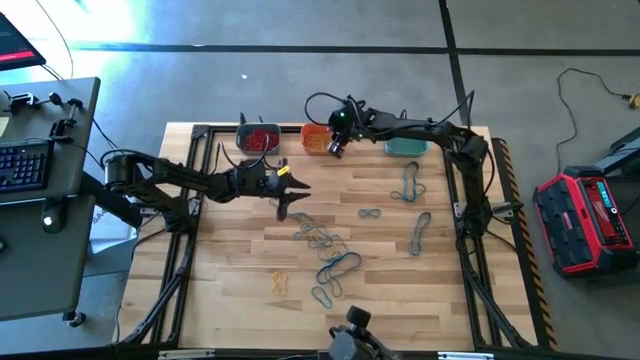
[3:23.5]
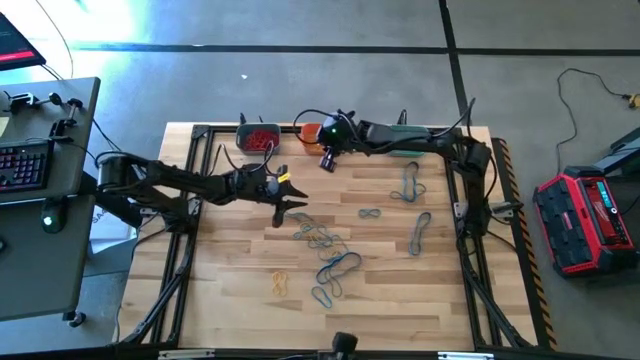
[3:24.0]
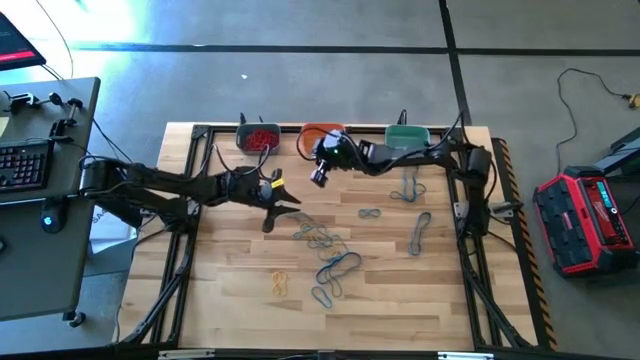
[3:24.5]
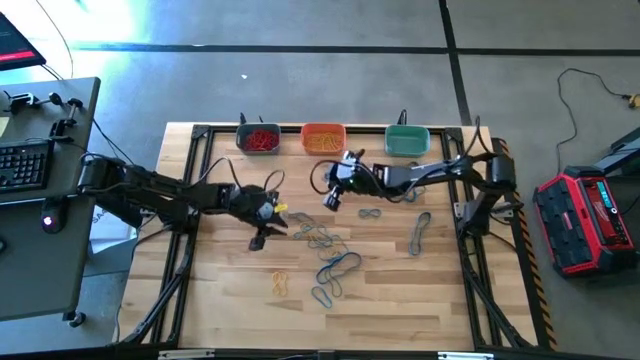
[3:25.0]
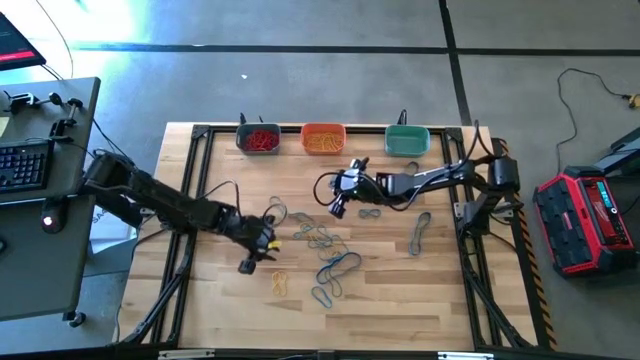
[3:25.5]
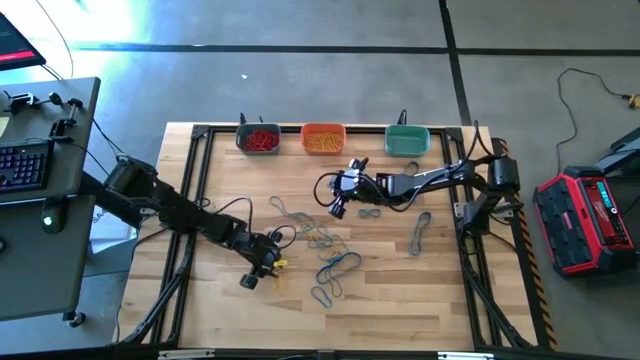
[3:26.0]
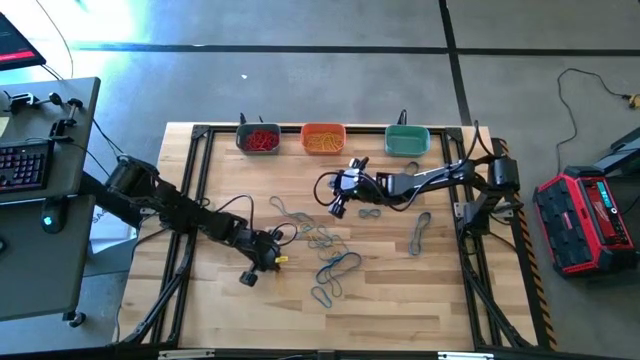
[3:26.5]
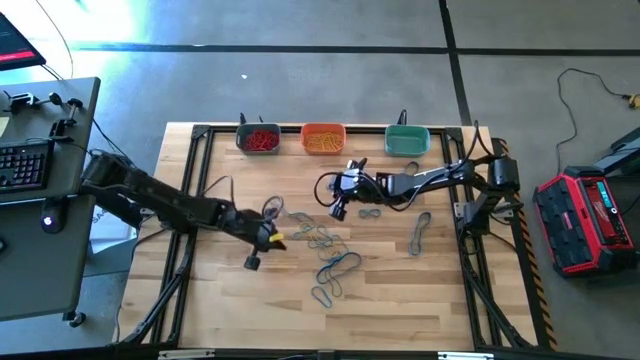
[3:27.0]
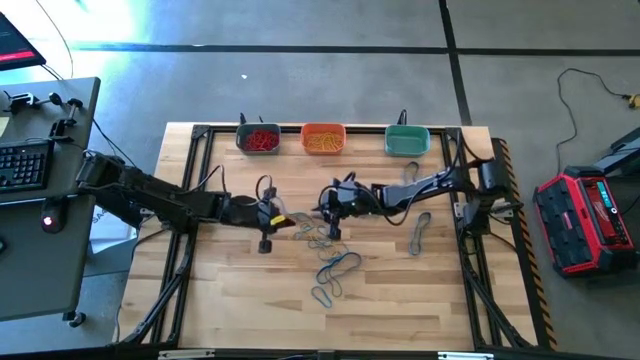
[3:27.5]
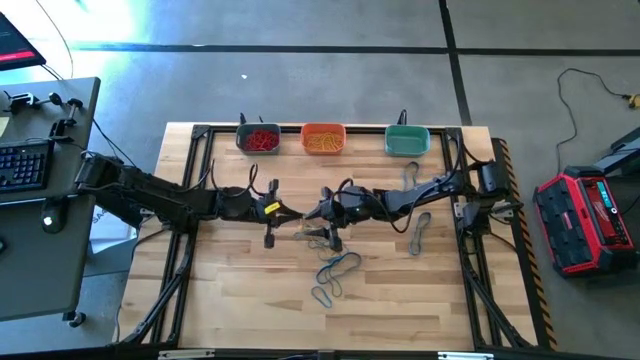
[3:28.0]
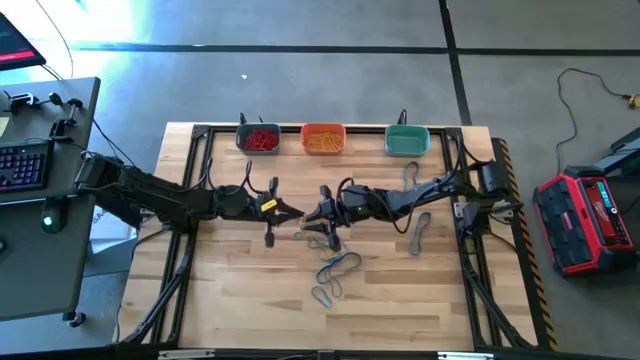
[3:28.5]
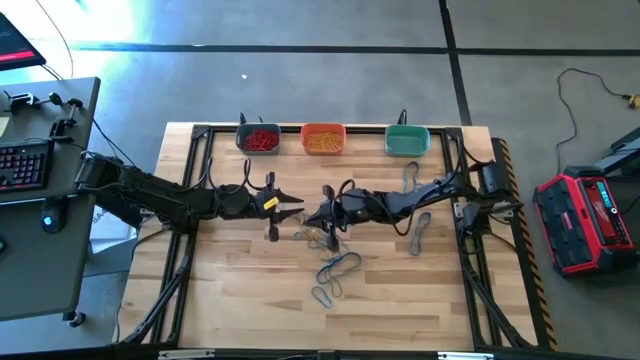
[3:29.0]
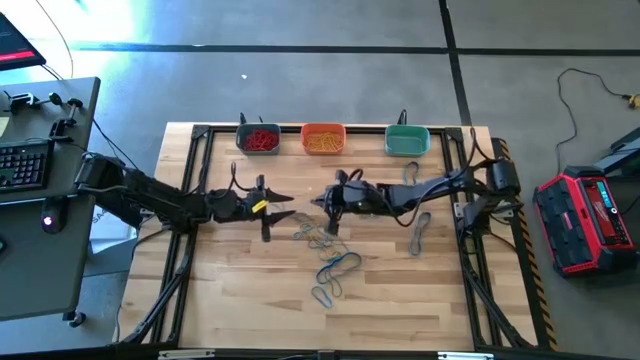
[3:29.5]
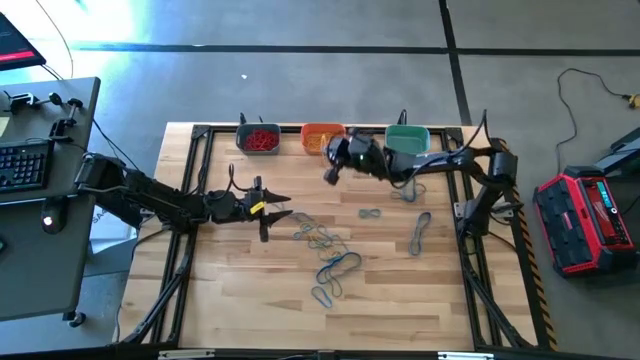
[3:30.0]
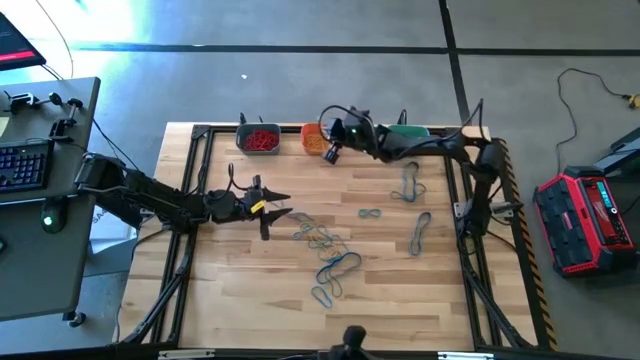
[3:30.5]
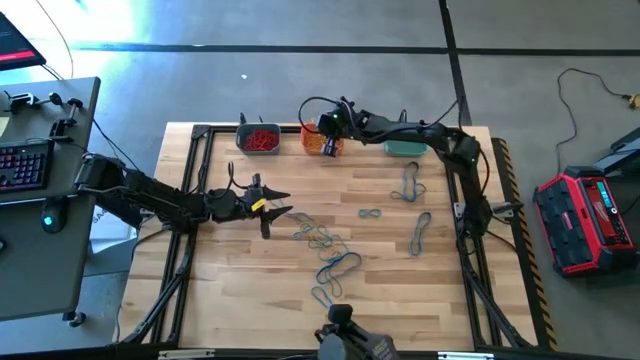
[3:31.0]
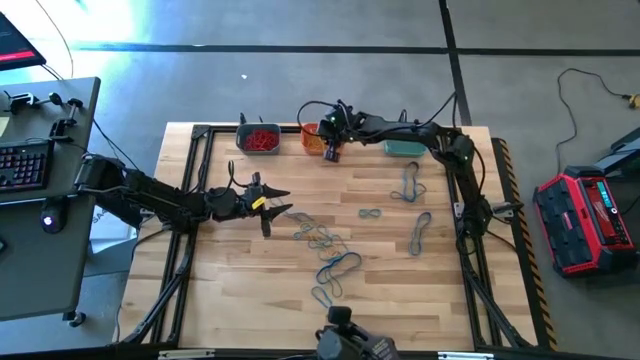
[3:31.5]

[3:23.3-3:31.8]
Task: Sort rubber bands into baskets
Put the yellow rubber band into the orange bin

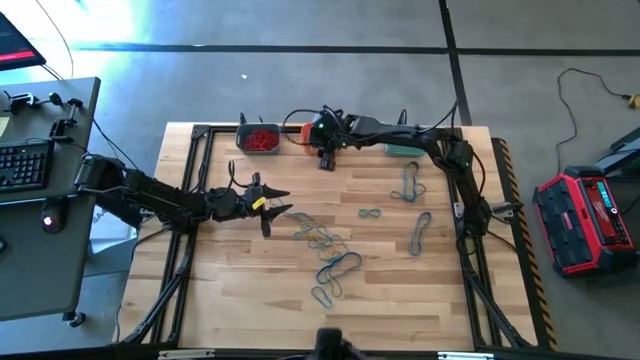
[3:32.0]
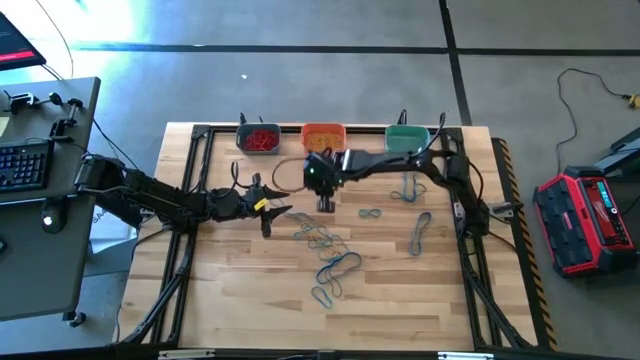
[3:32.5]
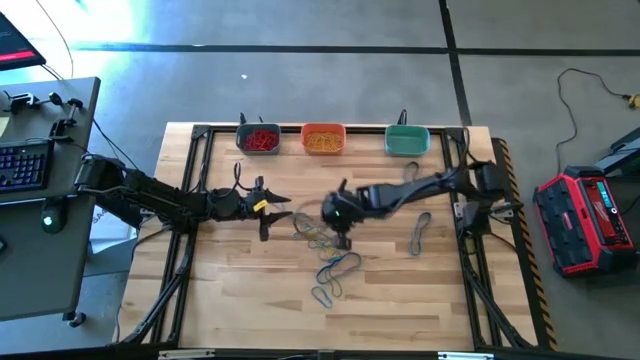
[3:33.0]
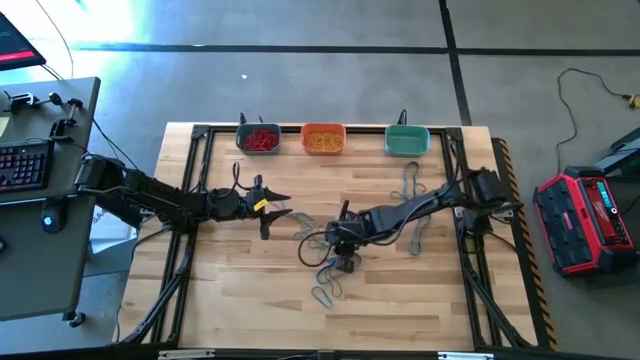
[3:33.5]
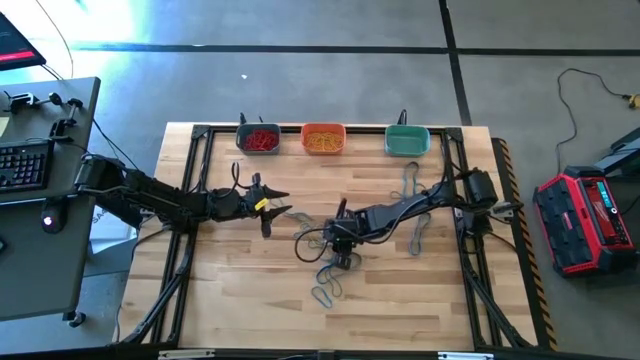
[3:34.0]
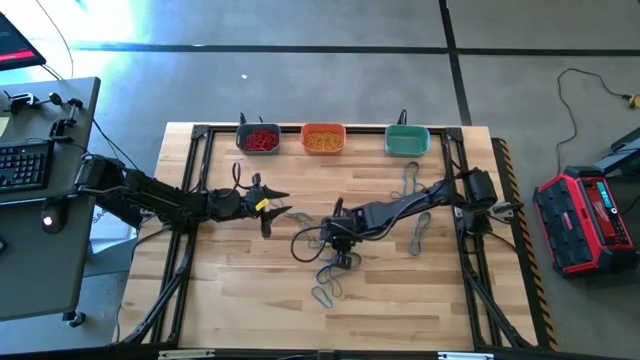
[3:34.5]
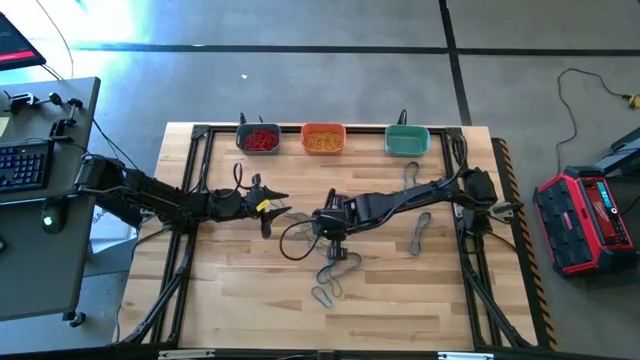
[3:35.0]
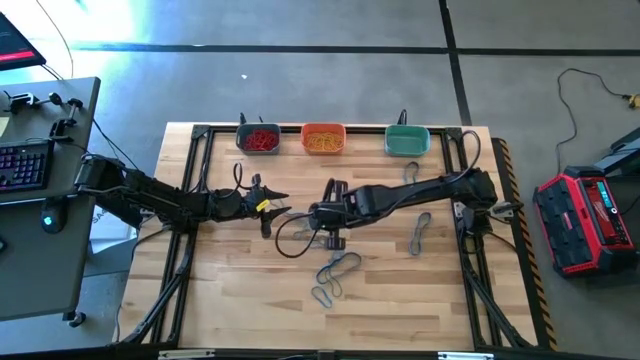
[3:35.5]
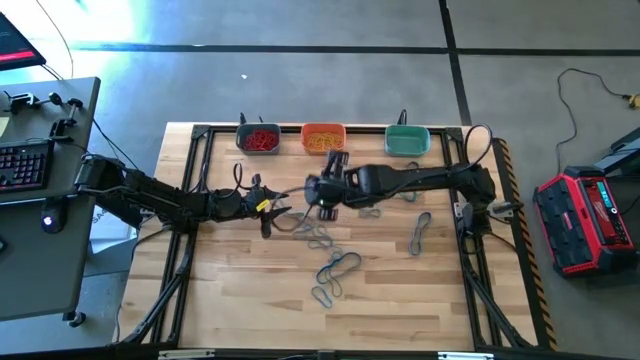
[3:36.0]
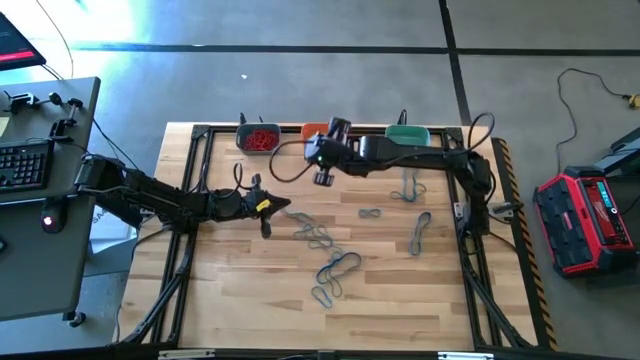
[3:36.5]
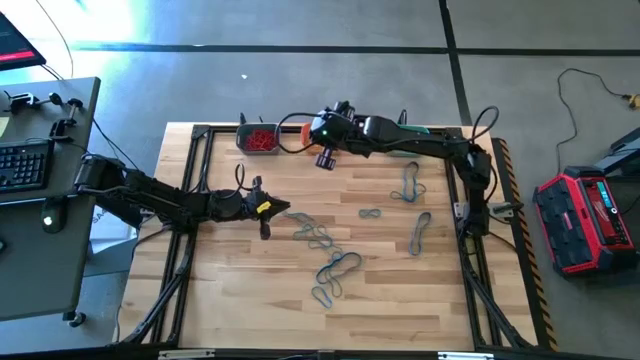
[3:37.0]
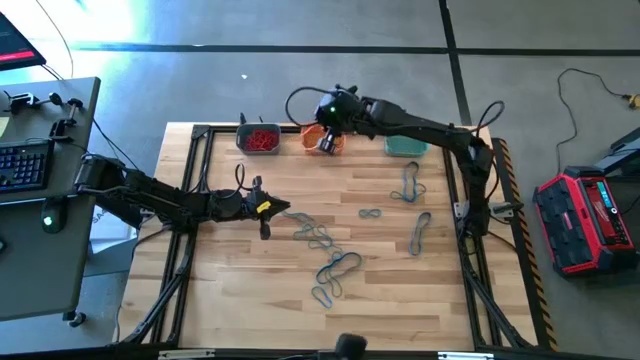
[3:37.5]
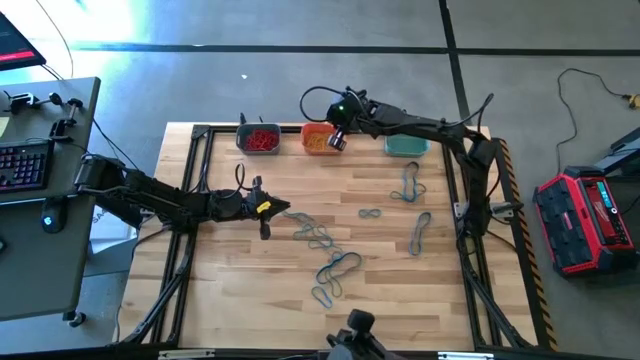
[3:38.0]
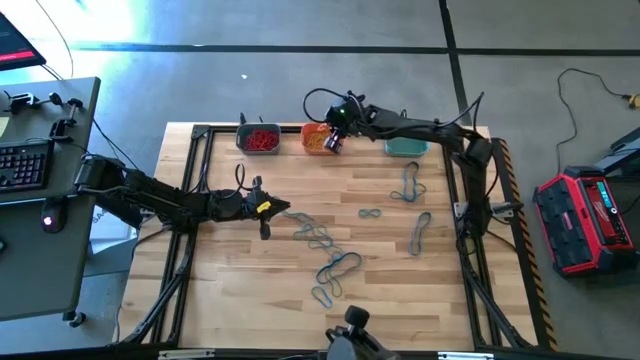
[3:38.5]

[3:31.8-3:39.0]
Put the yellow rubber band into the orange bin

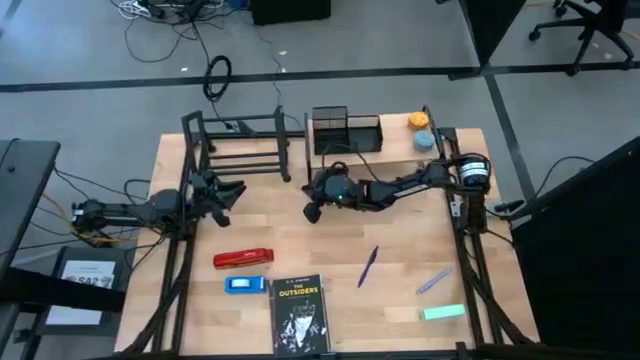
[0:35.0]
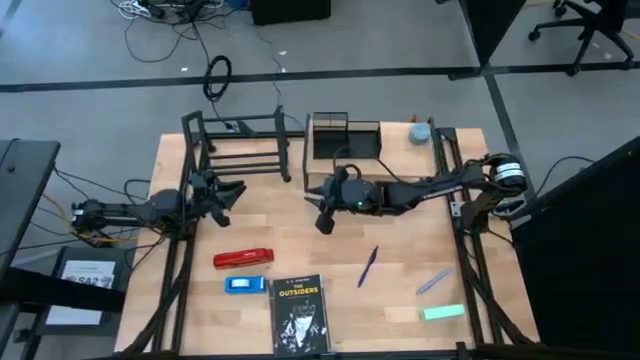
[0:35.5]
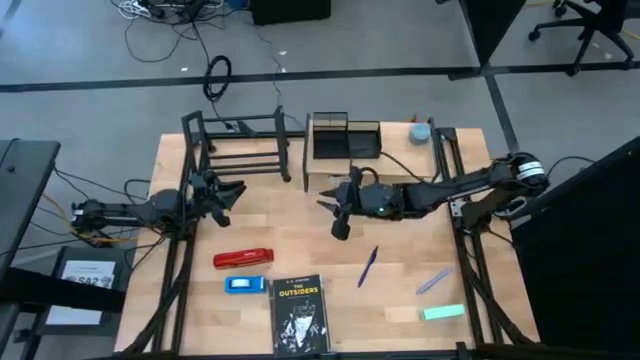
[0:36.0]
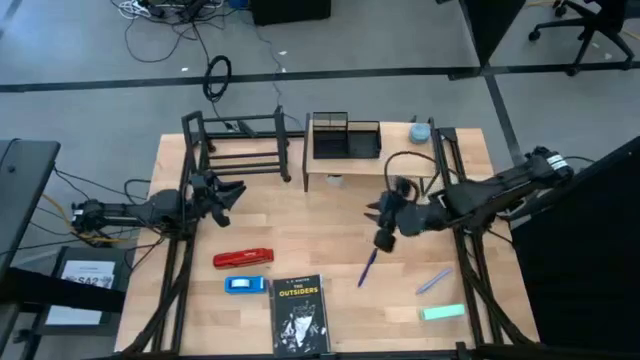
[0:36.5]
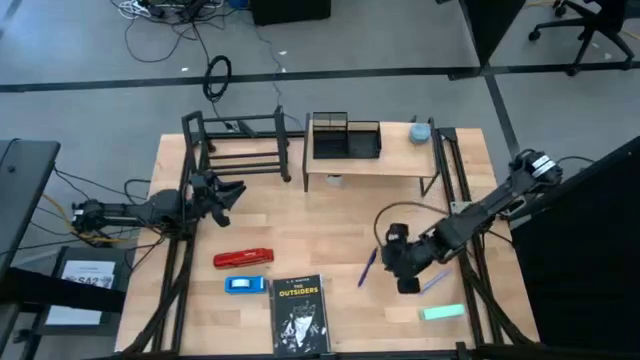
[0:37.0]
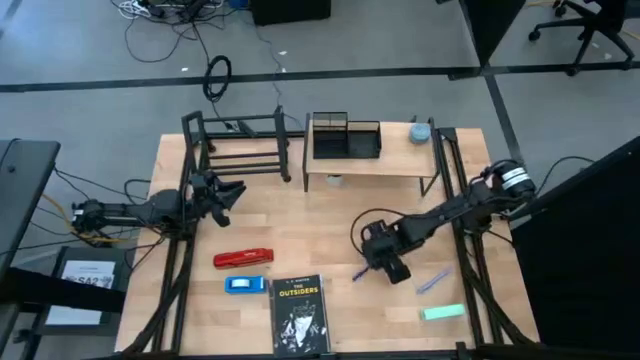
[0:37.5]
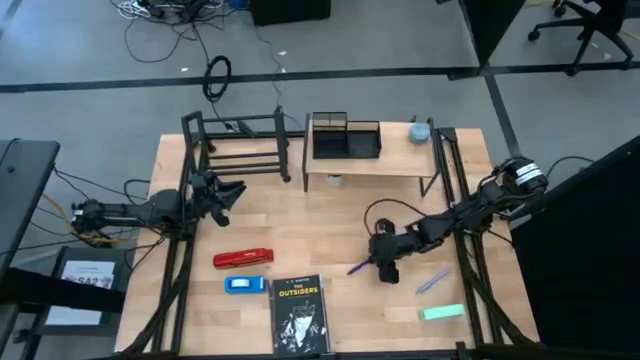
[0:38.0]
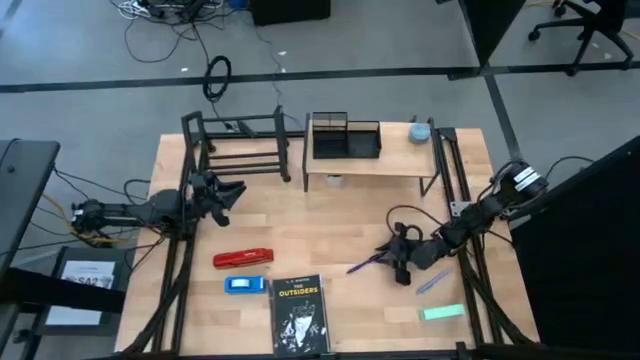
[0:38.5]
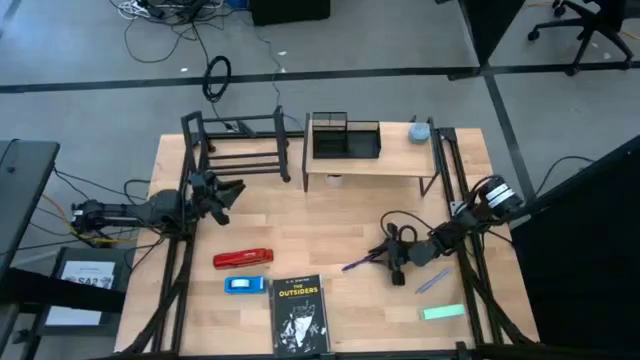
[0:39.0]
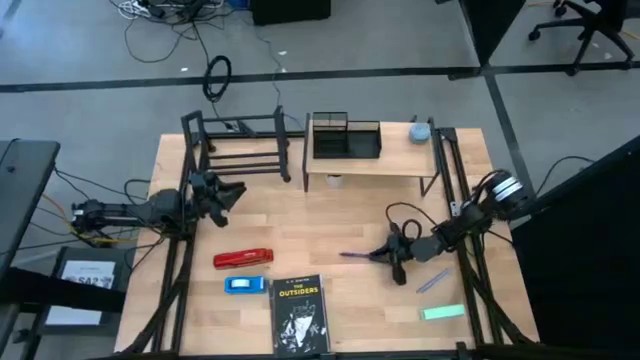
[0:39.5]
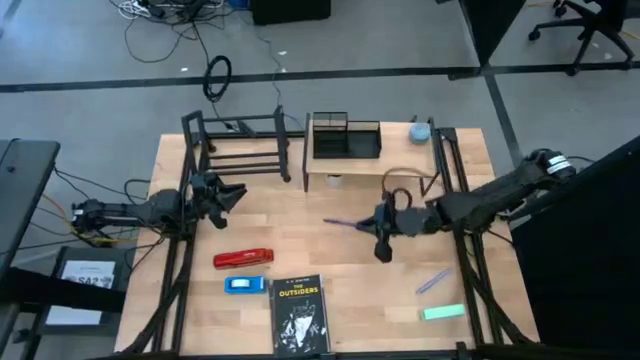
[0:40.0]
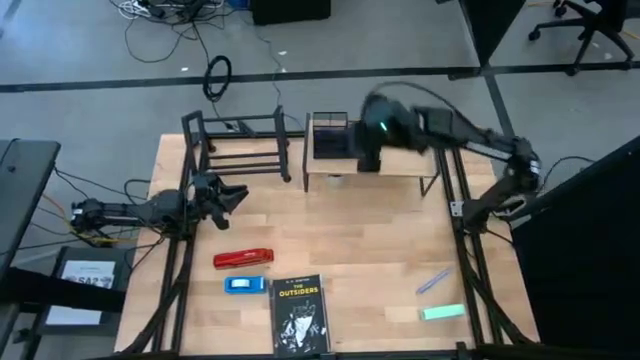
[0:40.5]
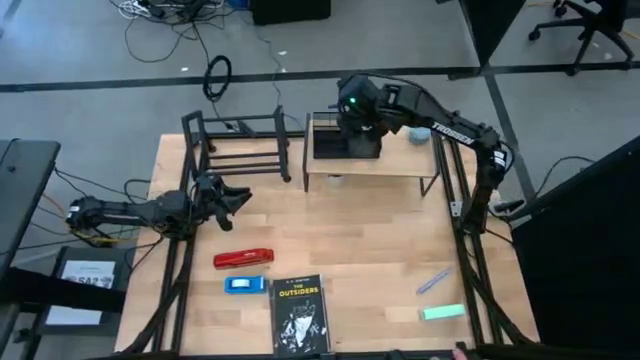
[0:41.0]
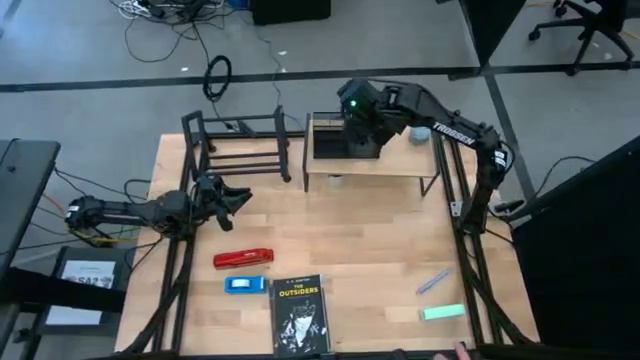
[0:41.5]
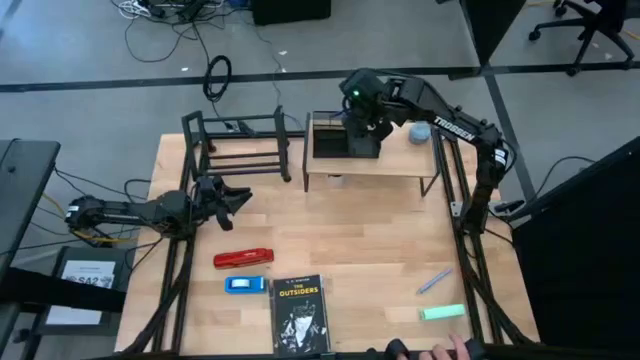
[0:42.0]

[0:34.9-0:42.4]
Task: Stock shelves
Put the blue pen into the pen holder of the black desk organizer
